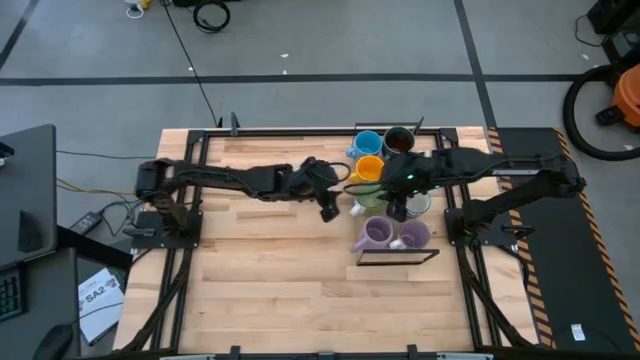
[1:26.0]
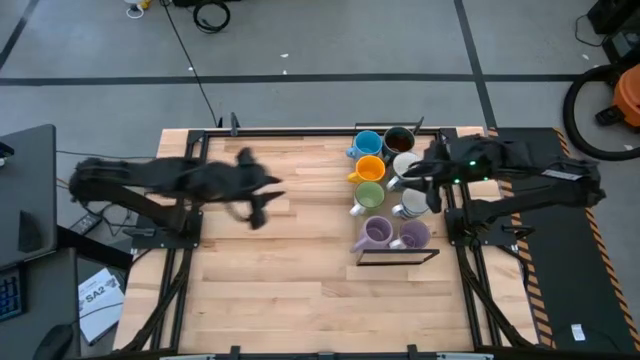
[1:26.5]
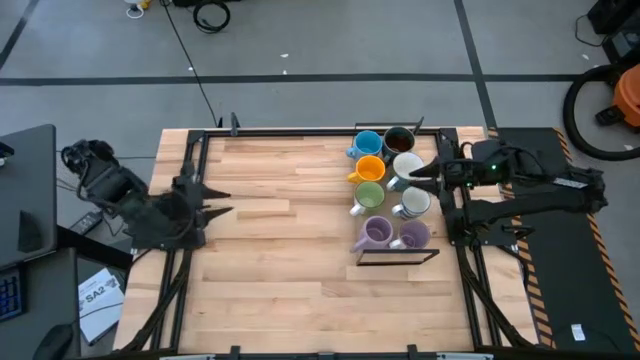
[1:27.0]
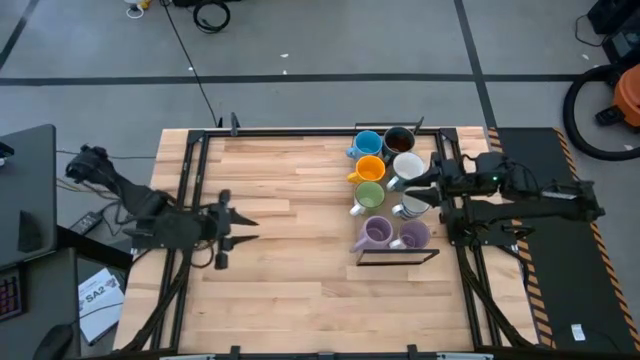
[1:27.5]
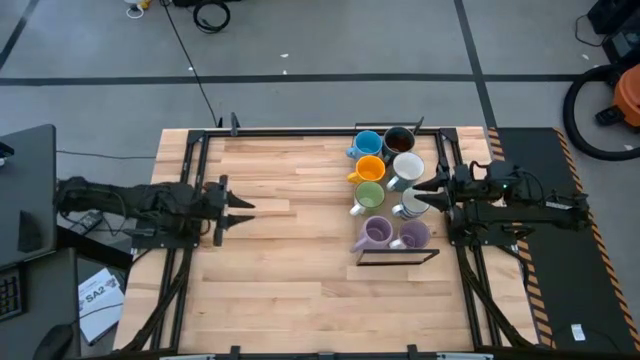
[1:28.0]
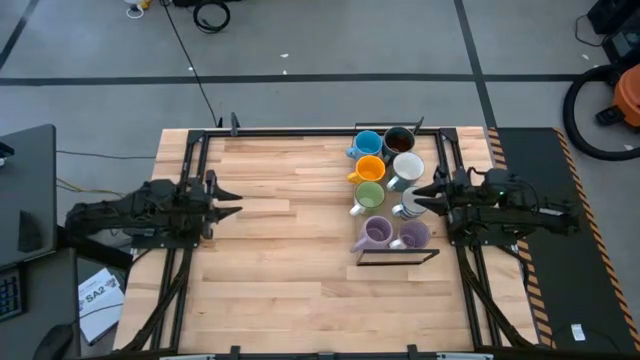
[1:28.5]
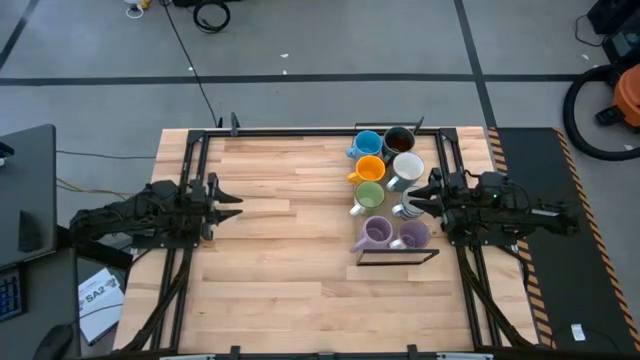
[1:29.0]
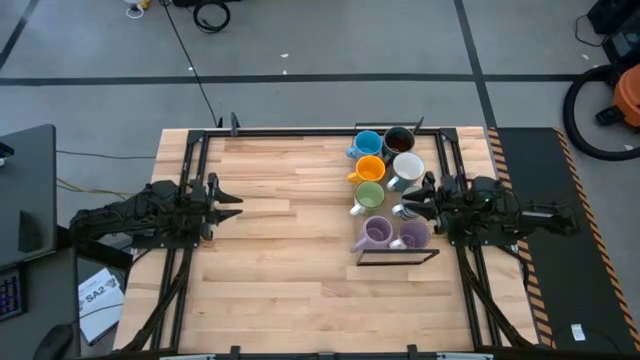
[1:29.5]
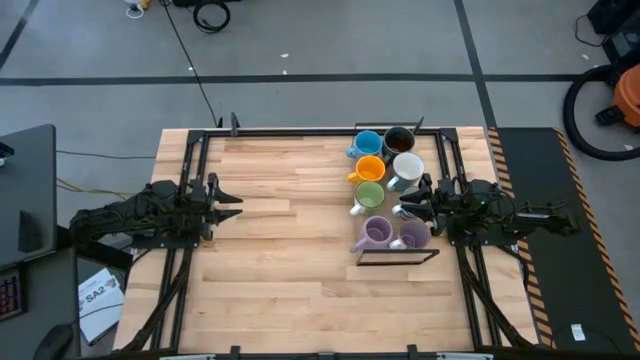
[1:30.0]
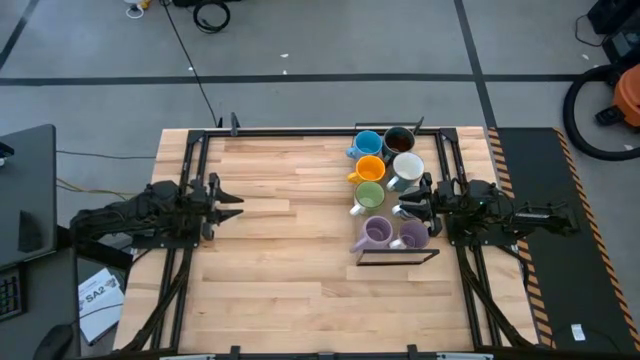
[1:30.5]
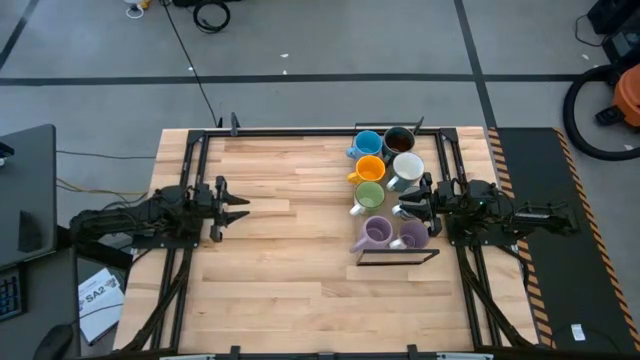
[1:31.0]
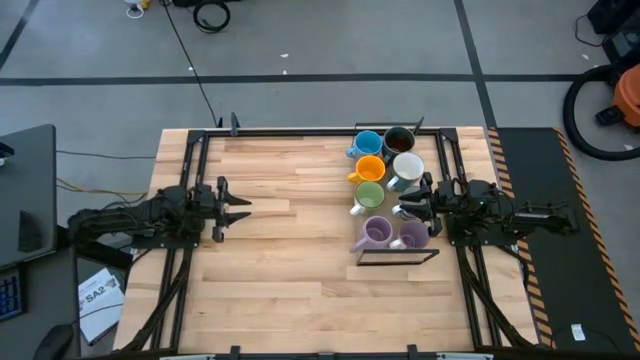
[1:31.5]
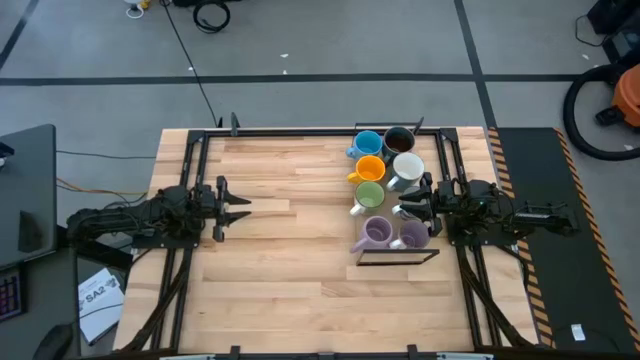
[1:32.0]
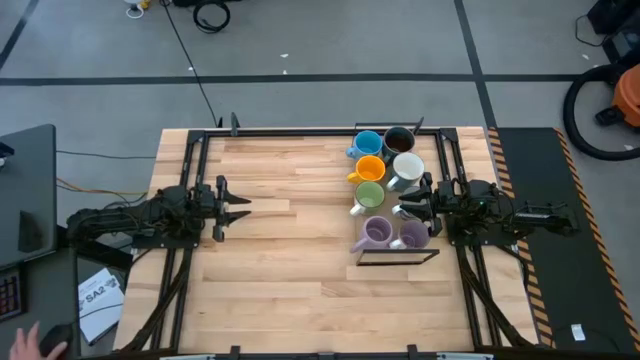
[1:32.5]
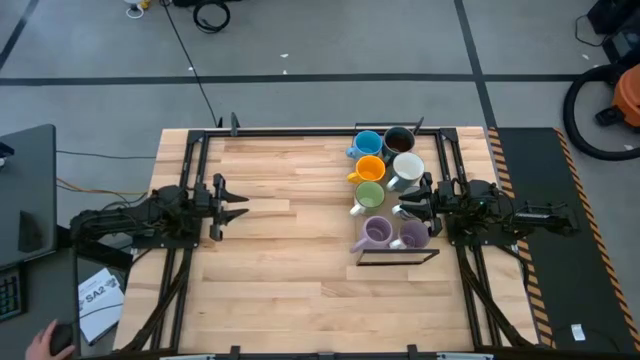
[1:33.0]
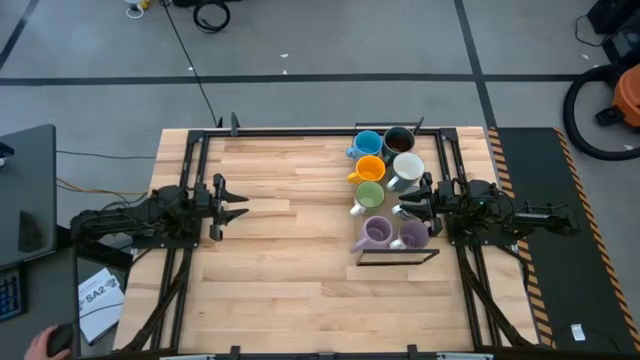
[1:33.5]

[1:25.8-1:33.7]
Task: Place coffee mugs
Return to Home Position

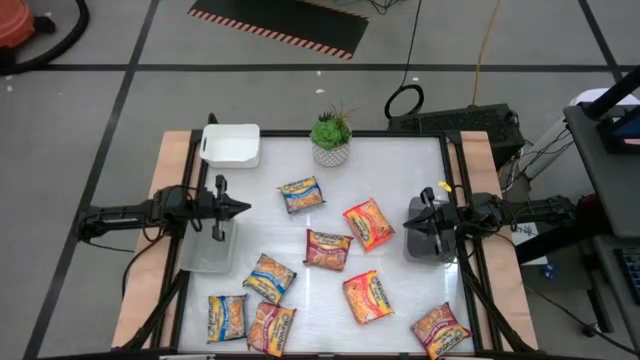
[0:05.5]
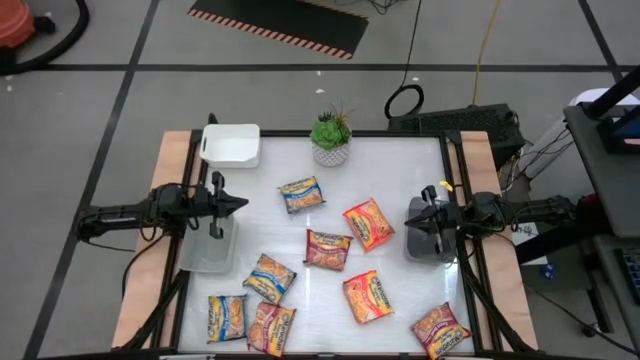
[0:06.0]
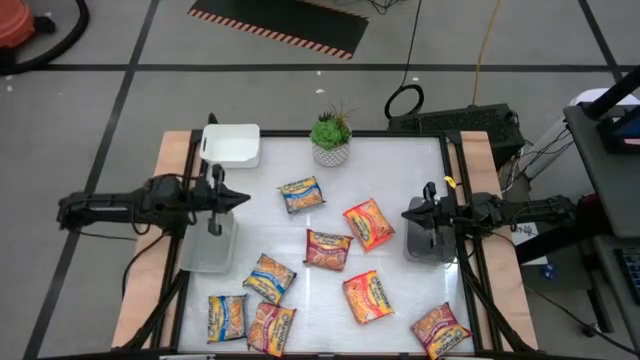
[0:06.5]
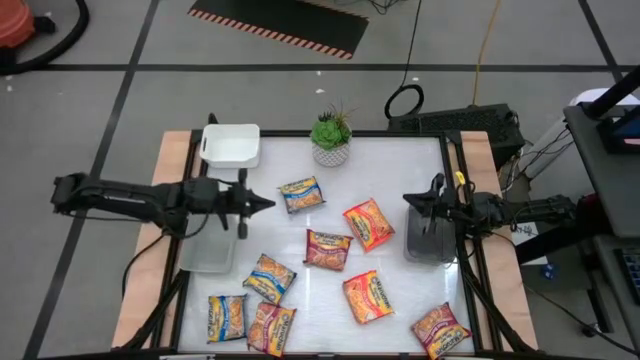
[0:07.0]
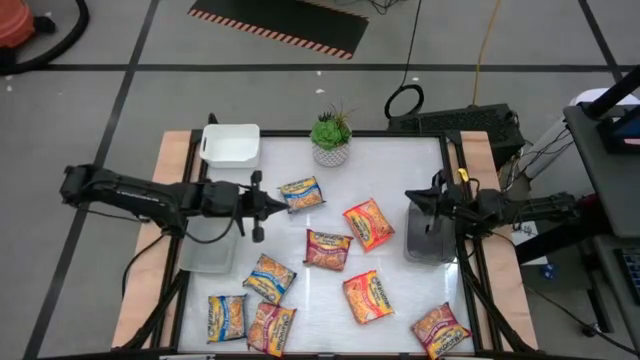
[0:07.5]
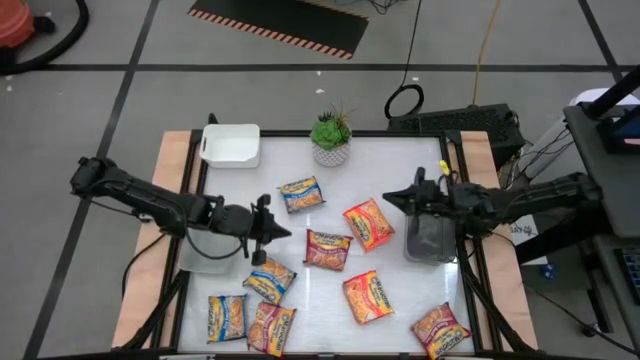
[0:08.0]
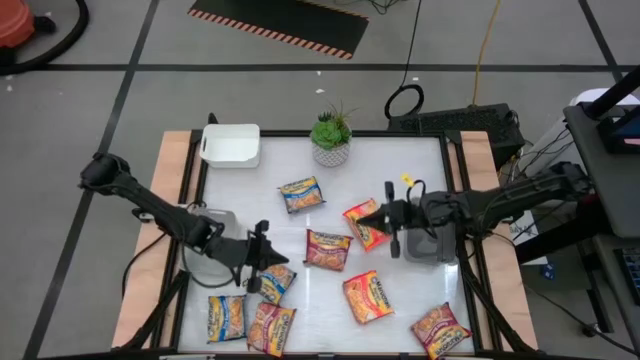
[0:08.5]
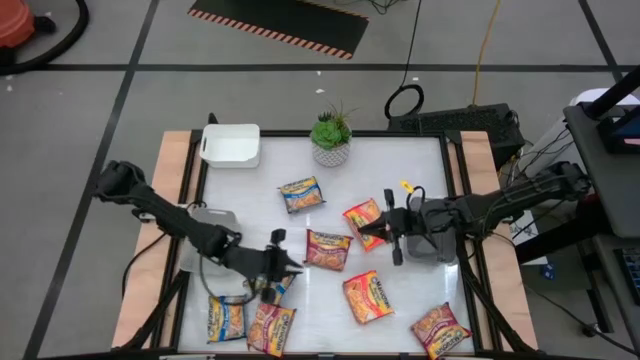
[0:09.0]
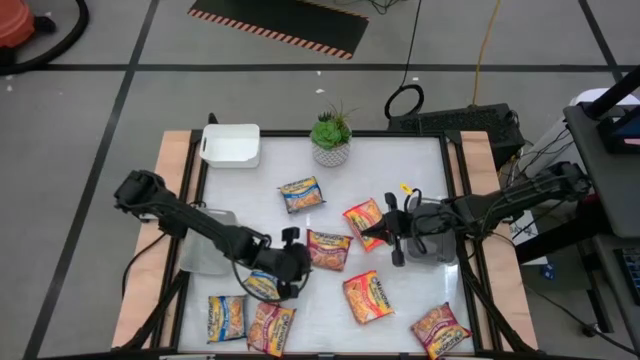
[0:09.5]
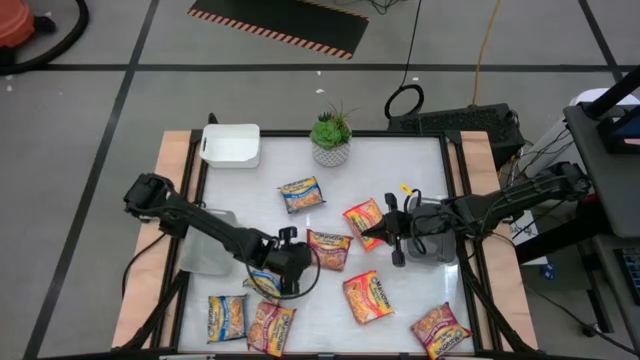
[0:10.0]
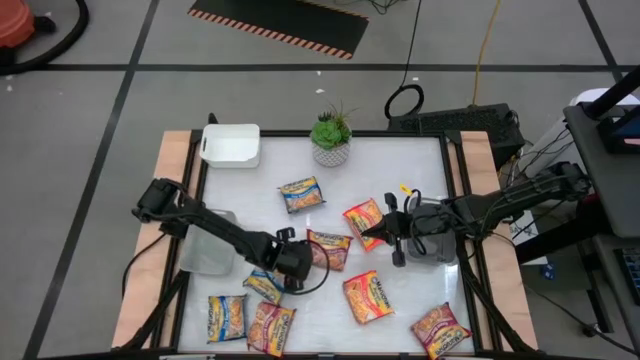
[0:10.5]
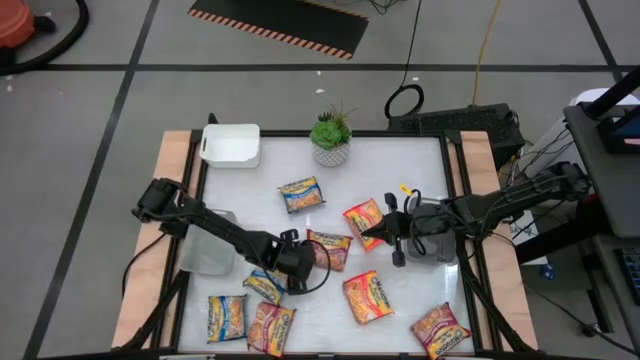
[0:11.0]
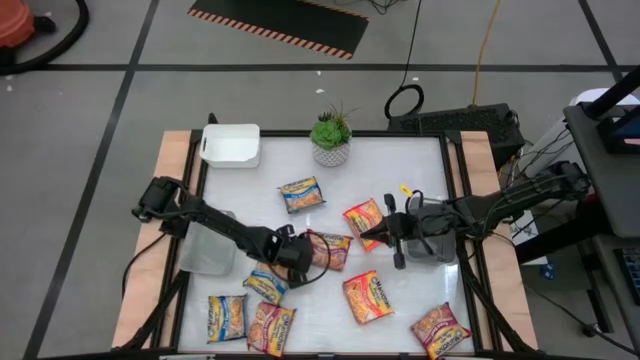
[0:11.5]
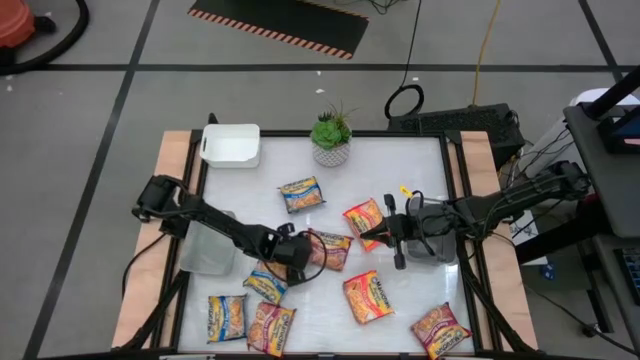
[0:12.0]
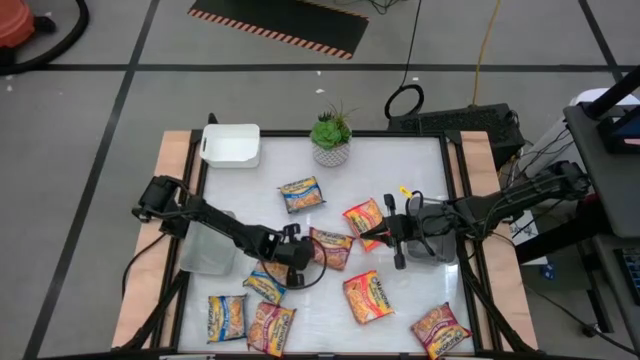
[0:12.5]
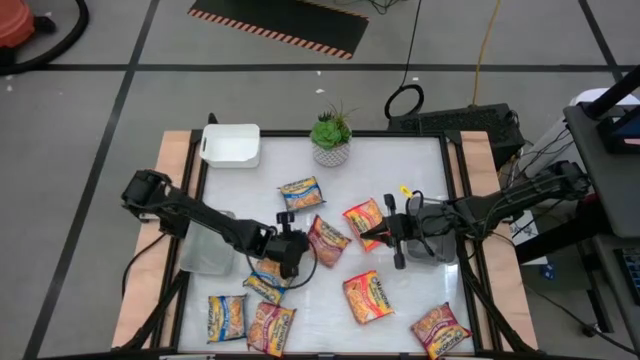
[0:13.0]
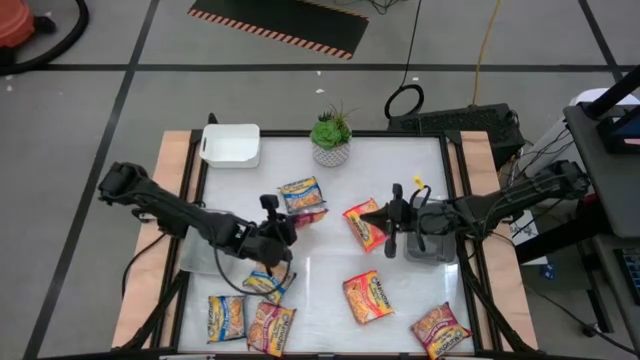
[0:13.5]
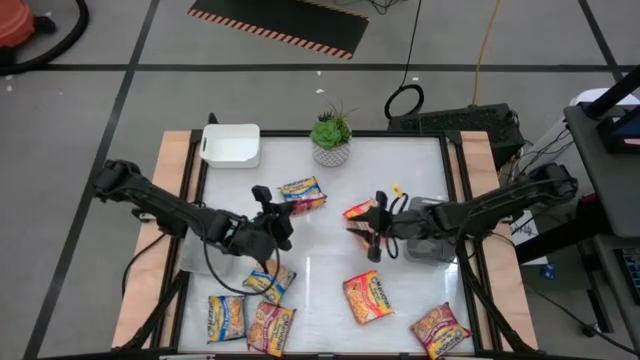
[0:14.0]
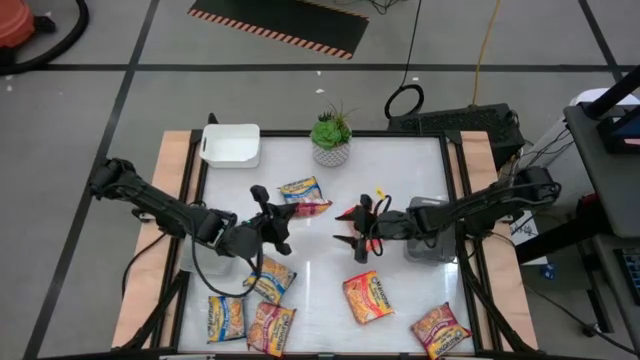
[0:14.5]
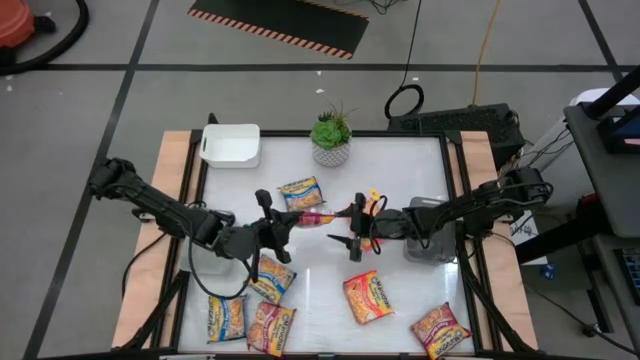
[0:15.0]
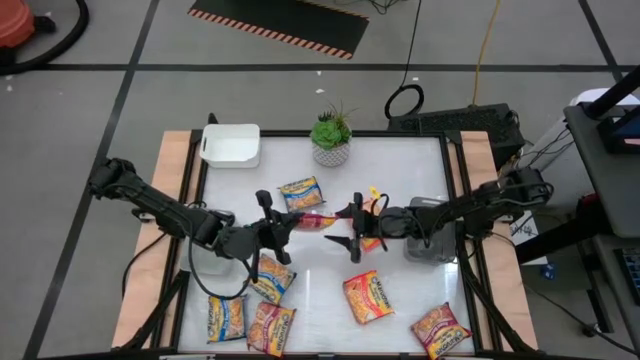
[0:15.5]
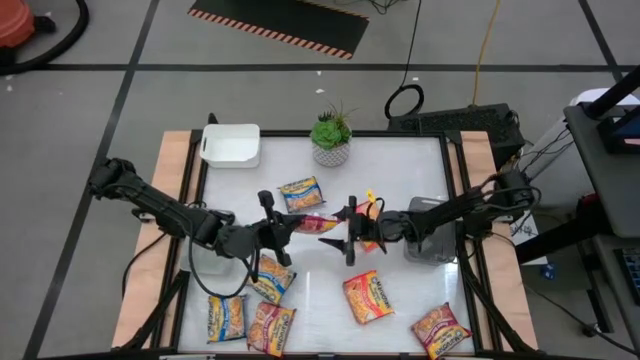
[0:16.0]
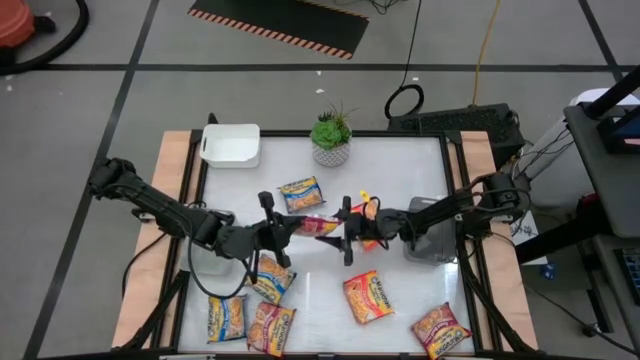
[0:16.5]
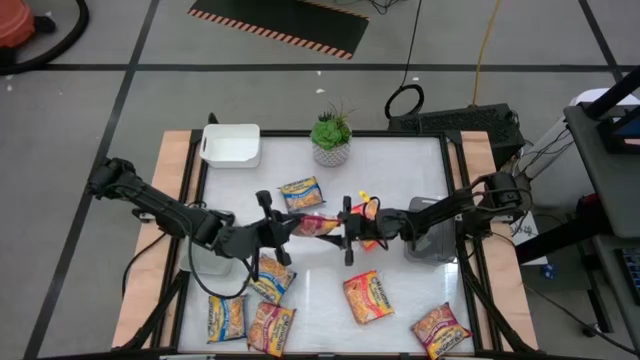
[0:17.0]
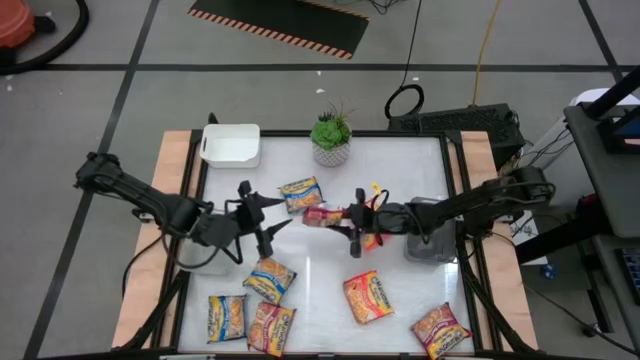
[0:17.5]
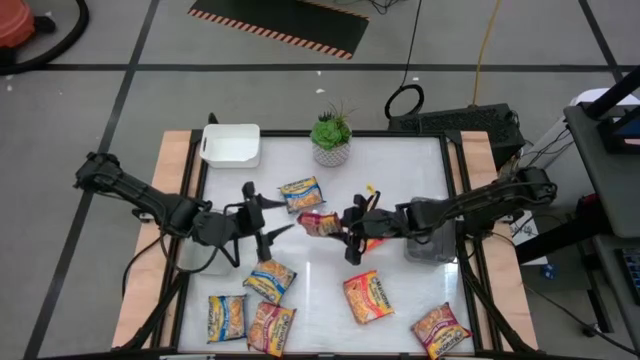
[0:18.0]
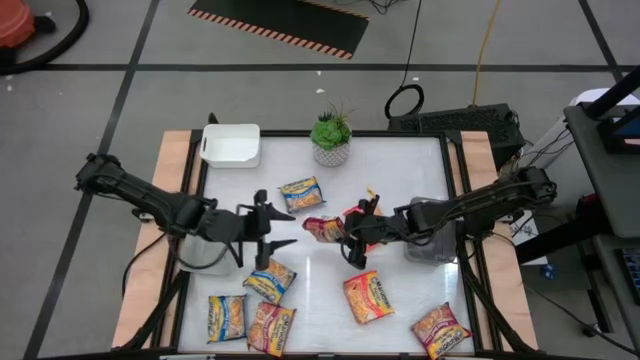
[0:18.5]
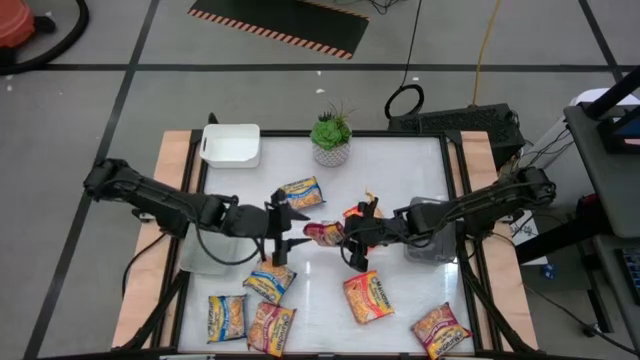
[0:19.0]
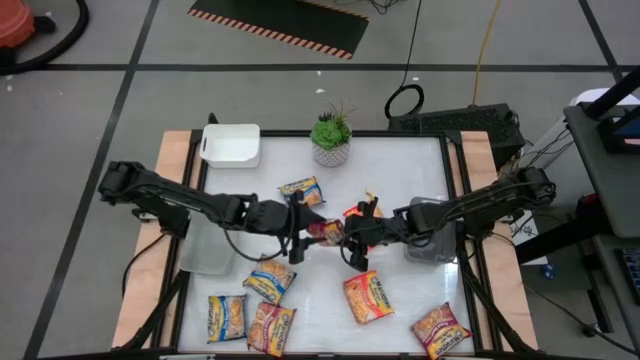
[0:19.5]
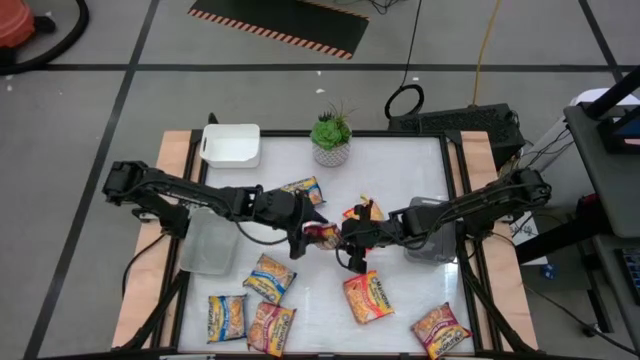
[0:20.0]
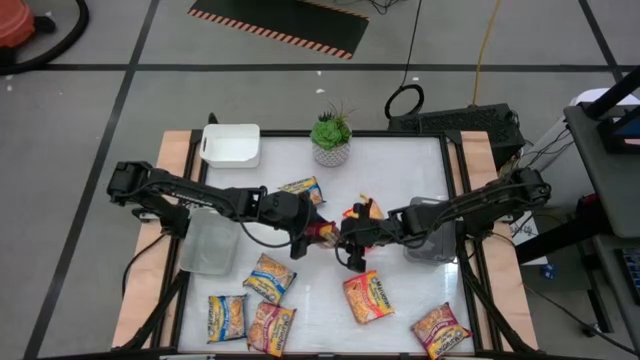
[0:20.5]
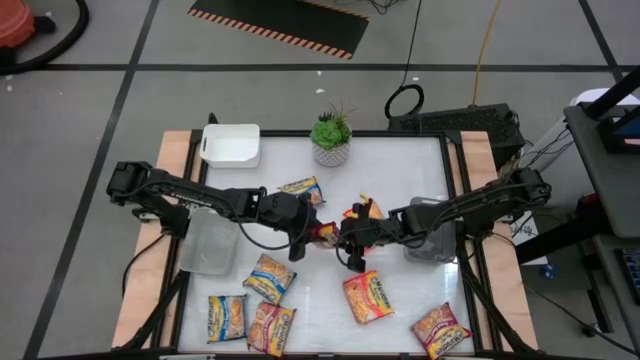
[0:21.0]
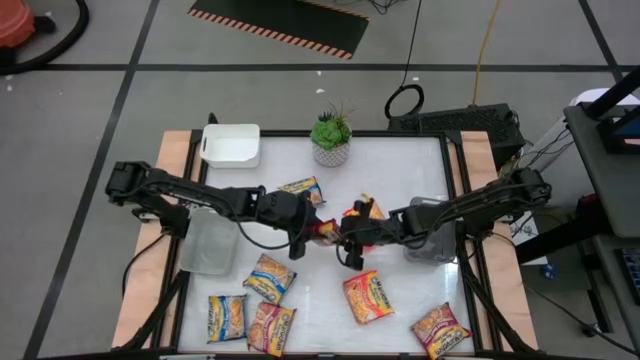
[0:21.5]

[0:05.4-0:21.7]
Task: Sort Maruchan noodles
Put the top red noodle pack into the white bin
